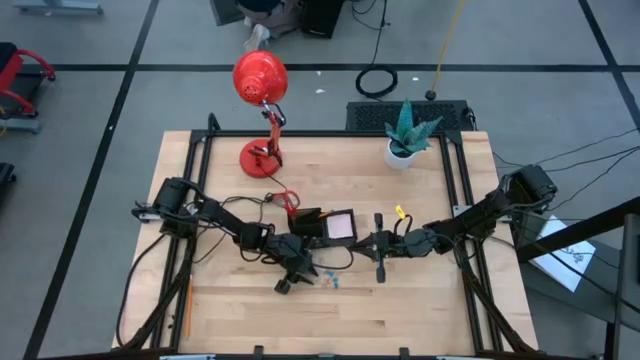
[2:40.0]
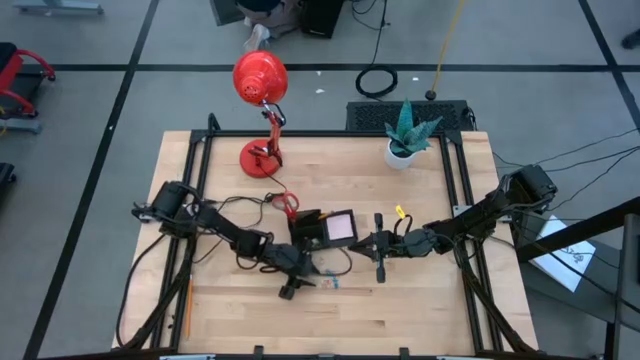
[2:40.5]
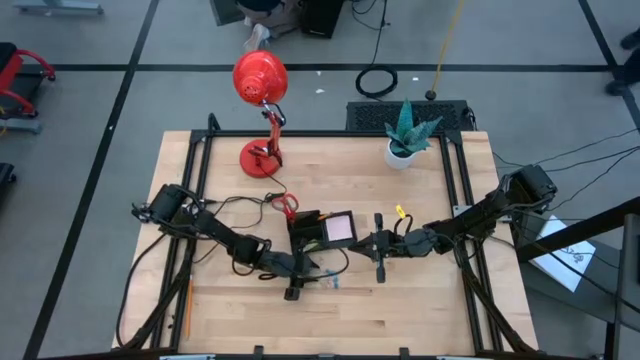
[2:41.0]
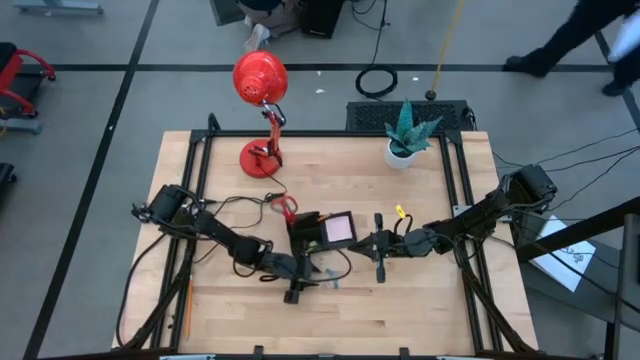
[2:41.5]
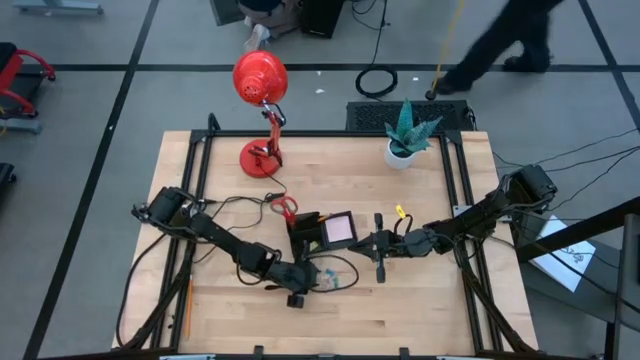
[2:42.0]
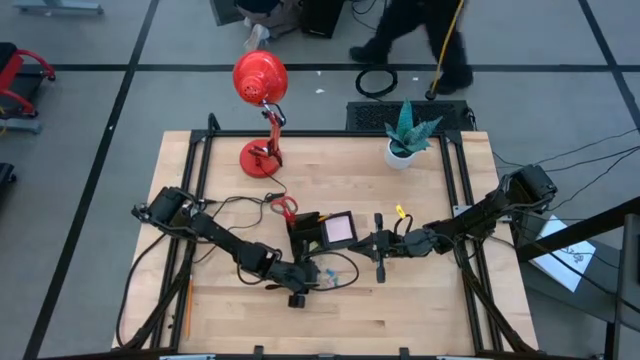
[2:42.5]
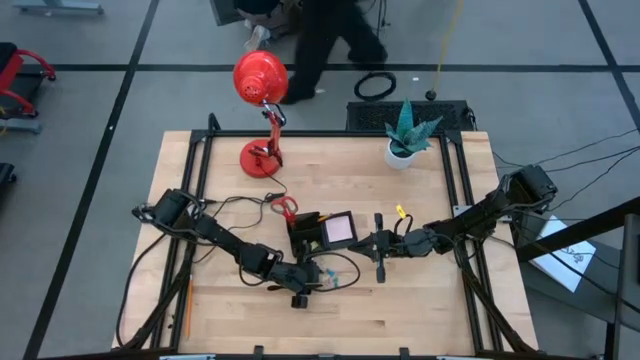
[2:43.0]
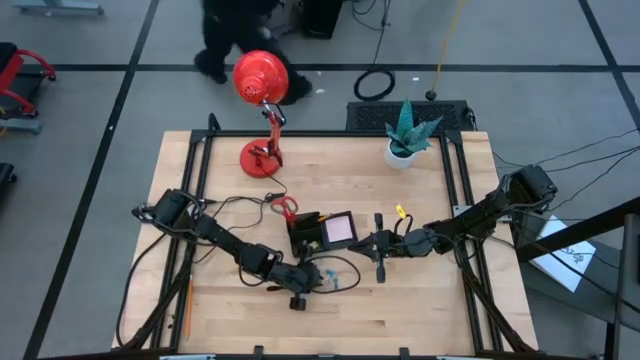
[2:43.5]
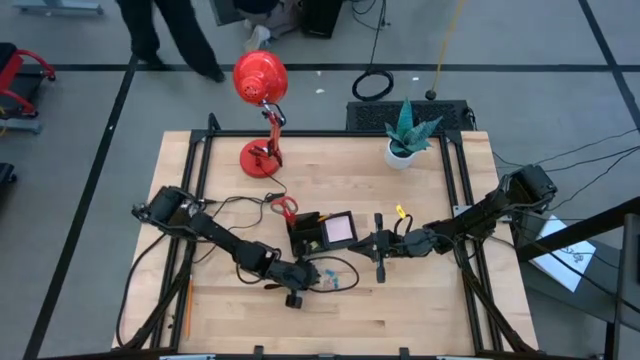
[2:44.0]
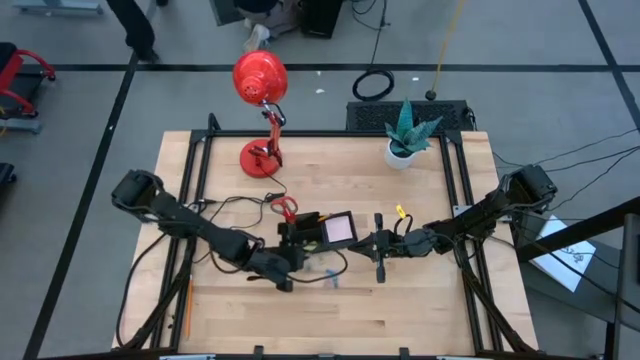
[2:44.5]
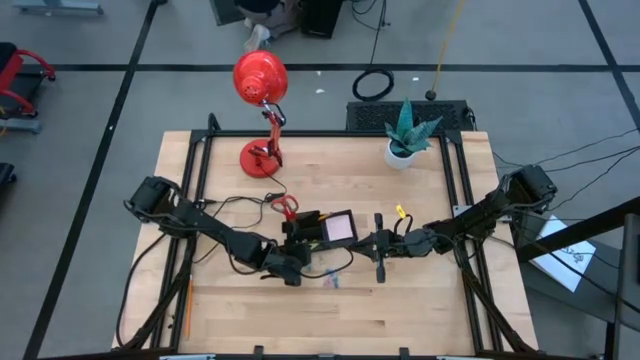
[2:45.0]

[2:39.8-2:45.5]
Task: Pick and place office supplies into organizer
Put the green binder clip into the black desk organizer

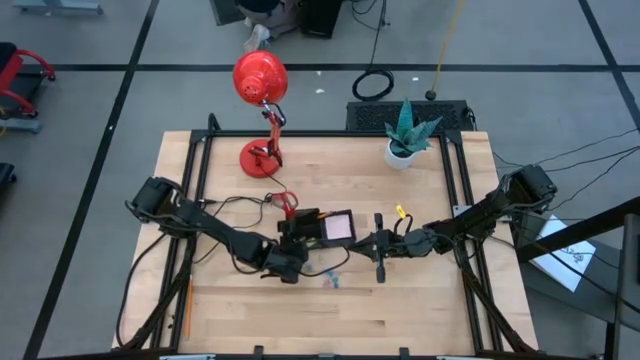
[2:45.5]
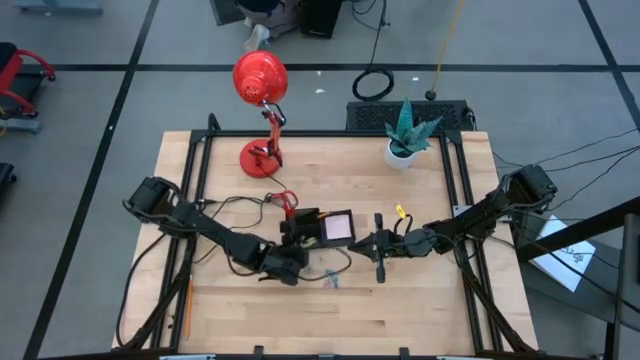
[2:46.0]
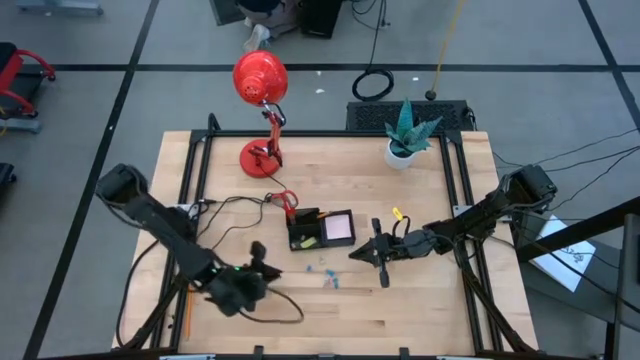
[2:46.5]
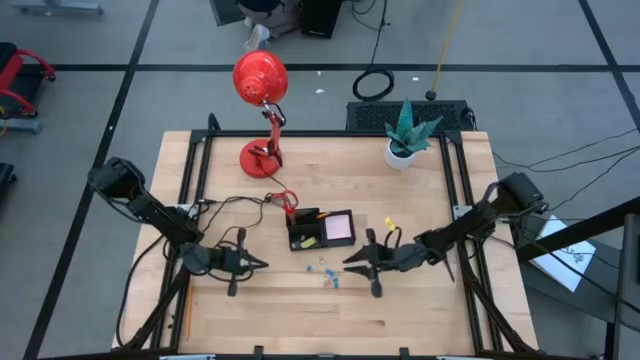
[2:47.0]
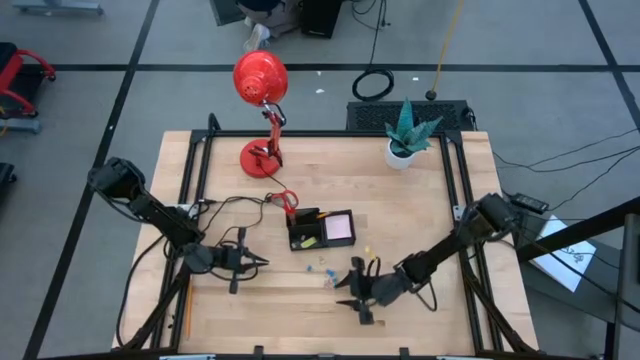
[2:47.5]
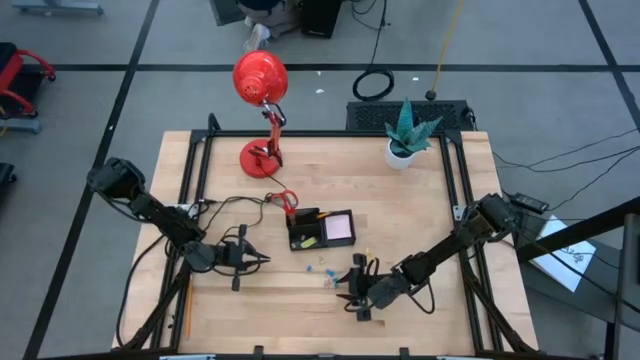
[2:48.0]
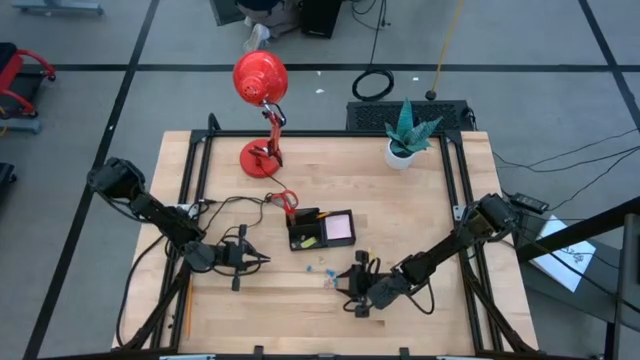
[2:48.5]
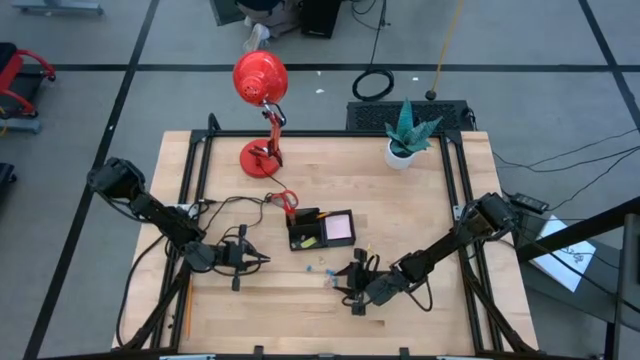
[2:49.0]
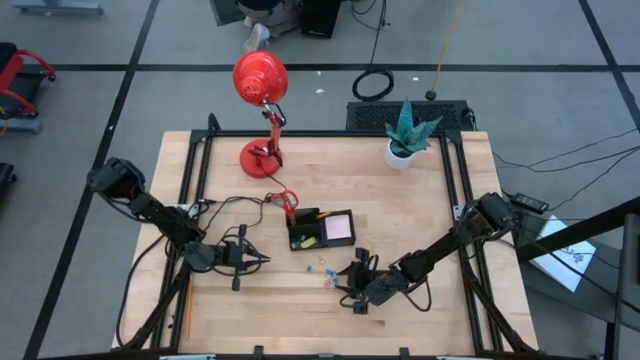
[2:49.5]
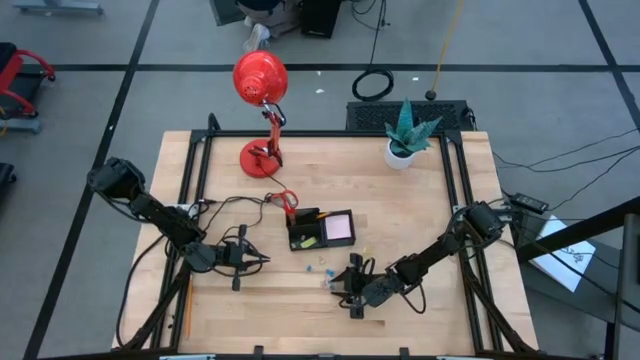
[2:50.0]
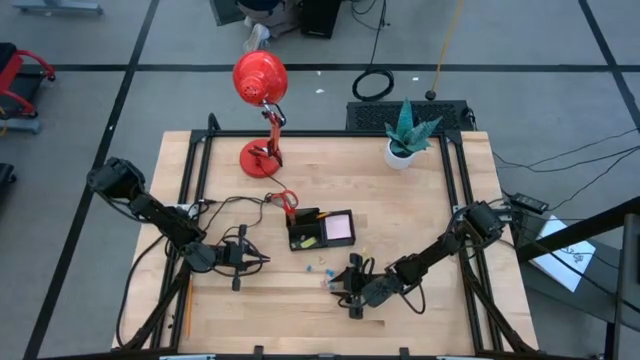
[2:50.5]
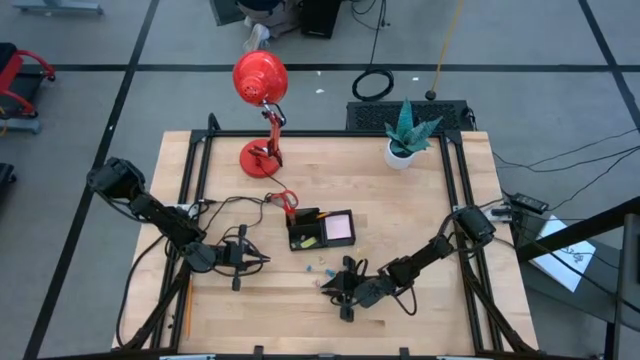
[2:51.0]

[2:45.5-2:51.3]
Put the blue binder clip into the black desk organizer

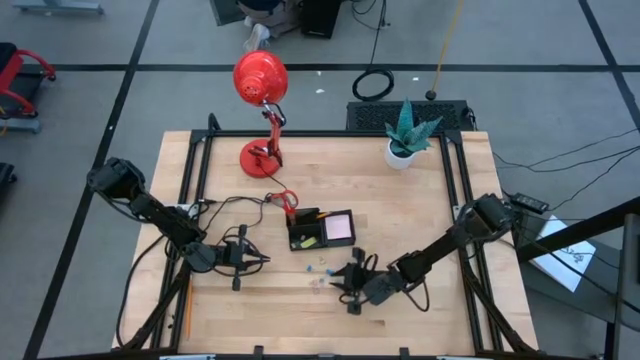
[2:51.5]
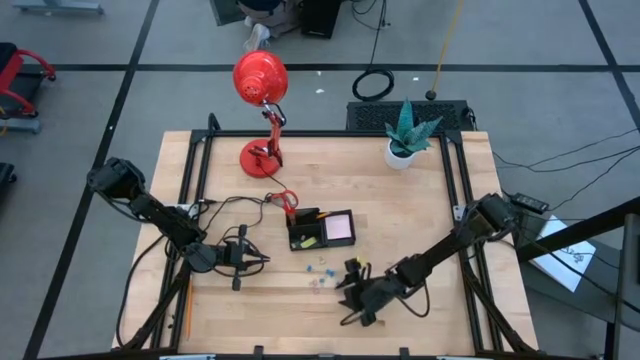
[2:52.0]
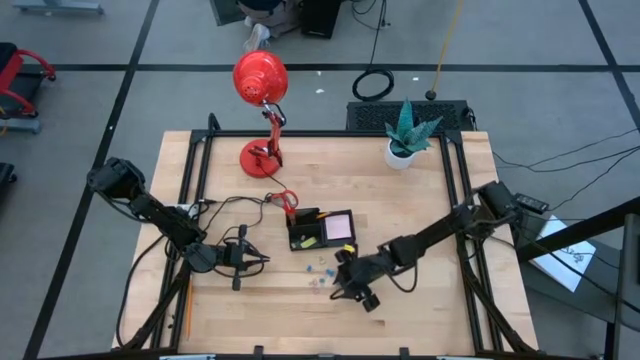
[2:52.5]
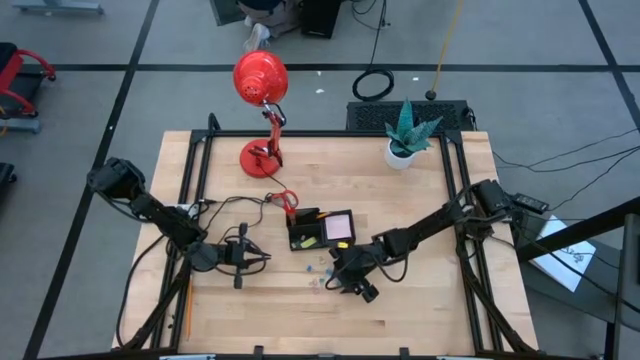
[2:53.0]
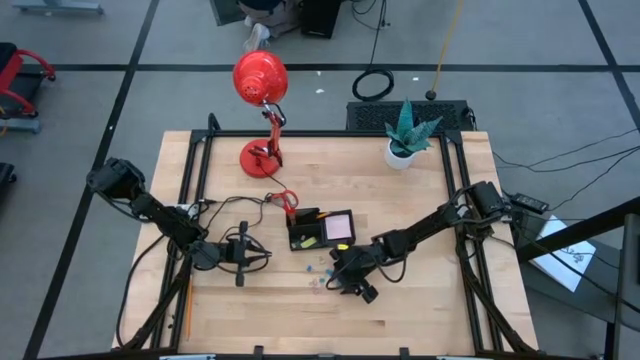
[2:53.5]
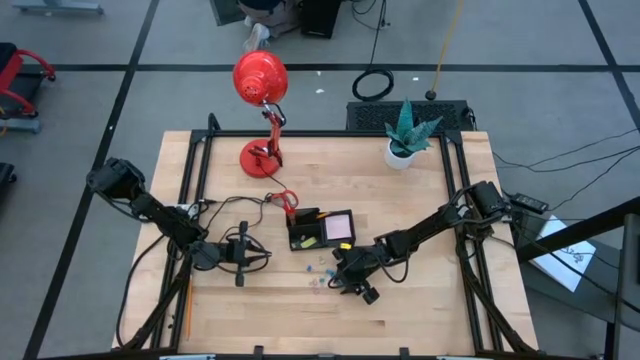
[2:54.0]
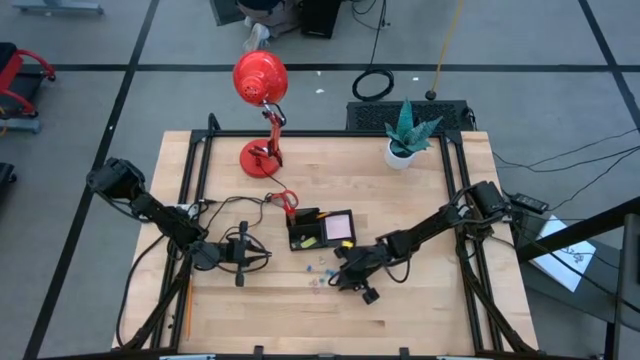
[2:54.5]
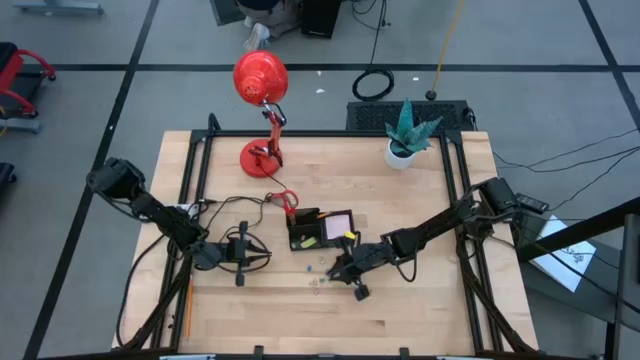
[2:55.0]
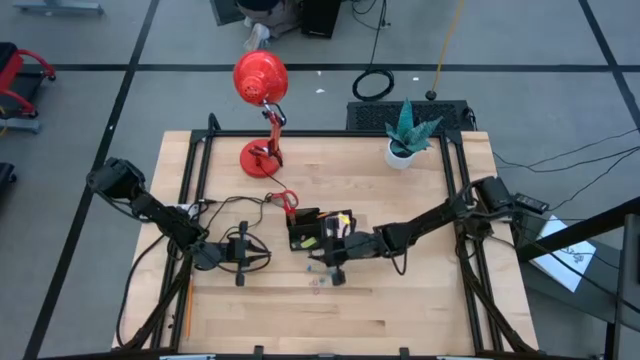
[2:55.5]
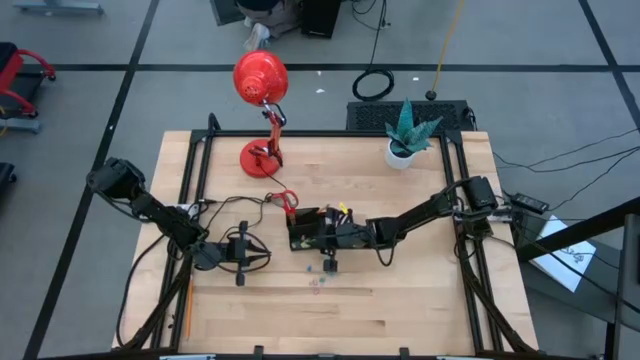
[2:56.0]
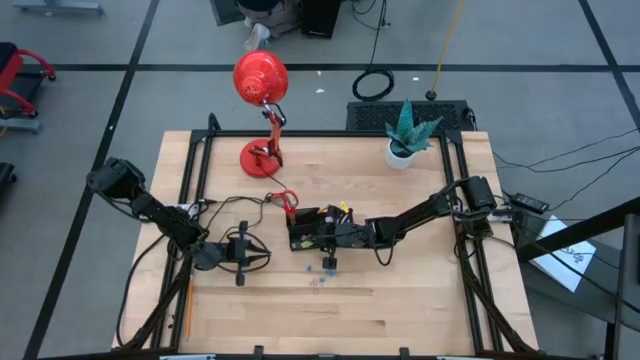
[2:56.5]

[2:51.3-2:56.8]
Put the blue binder clip into the black desk organizer

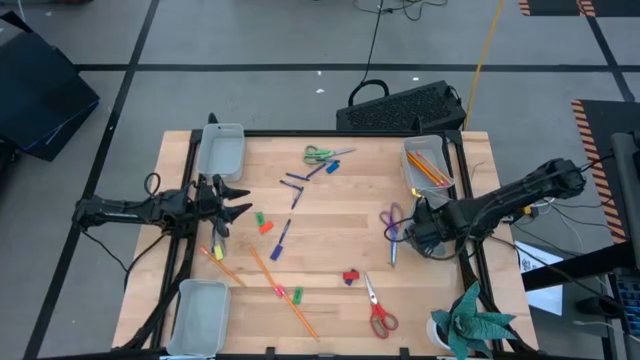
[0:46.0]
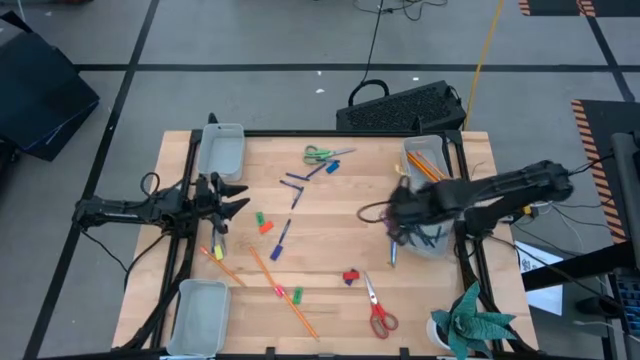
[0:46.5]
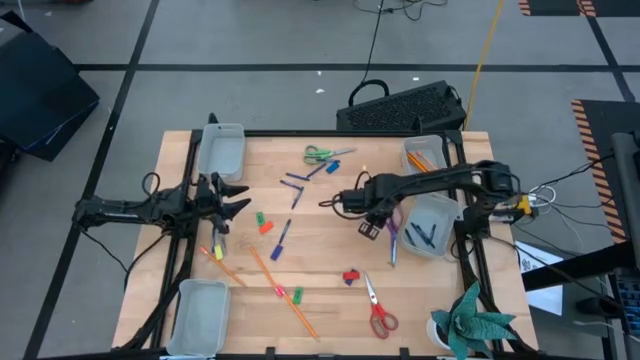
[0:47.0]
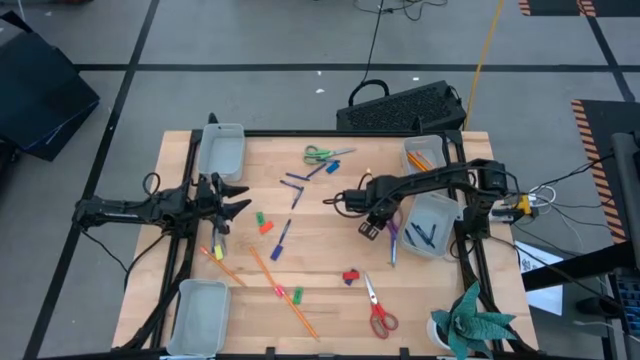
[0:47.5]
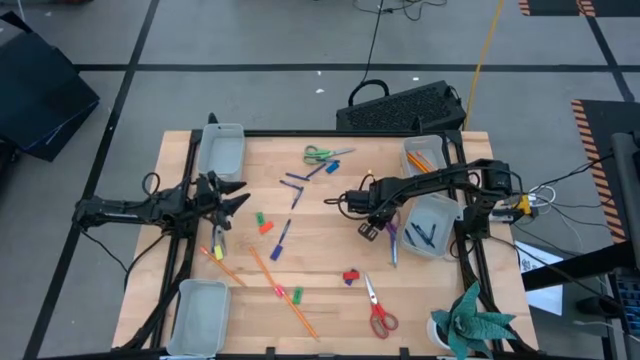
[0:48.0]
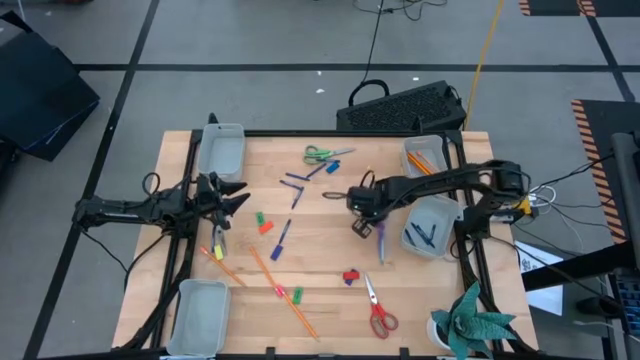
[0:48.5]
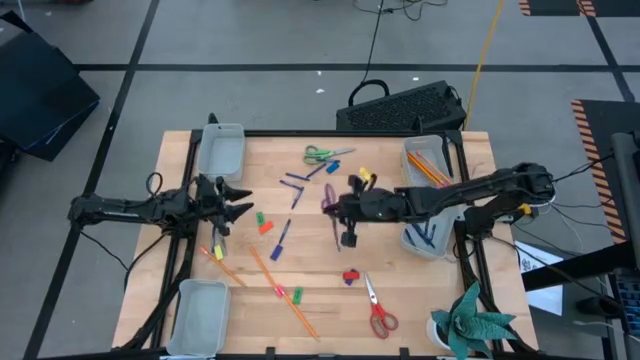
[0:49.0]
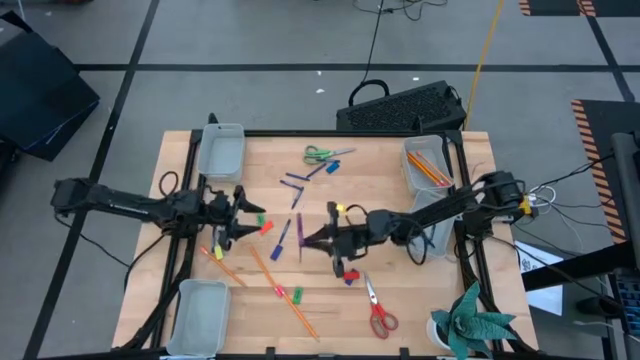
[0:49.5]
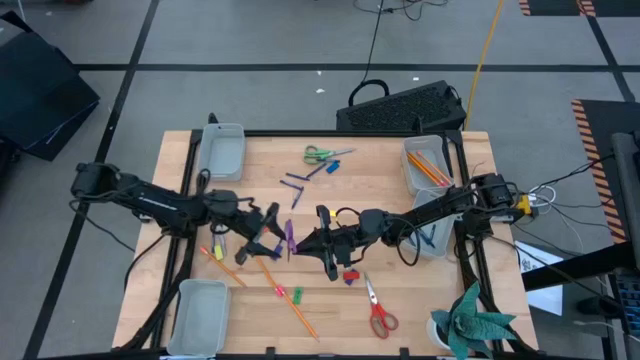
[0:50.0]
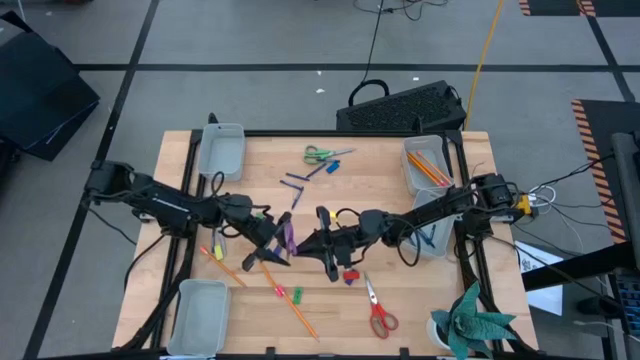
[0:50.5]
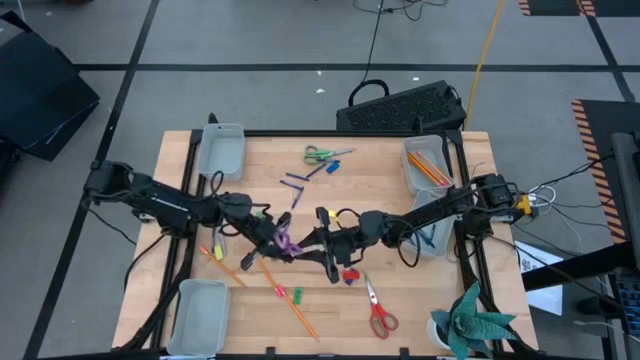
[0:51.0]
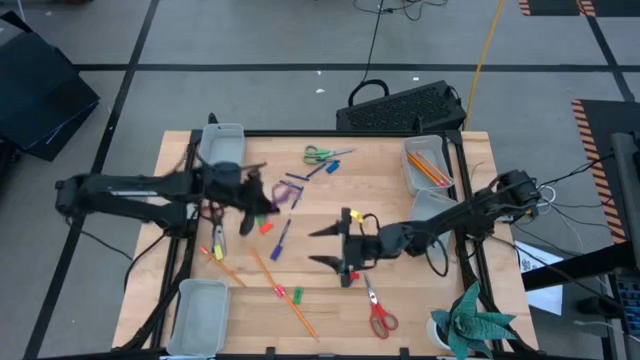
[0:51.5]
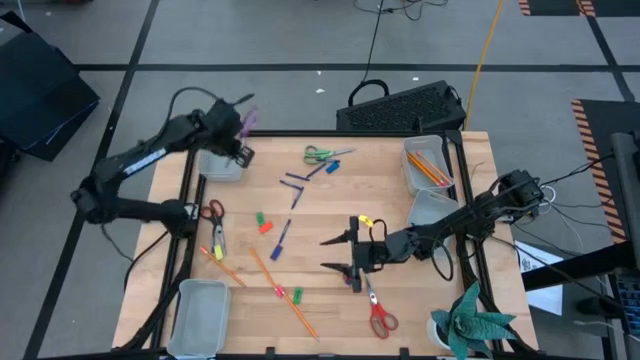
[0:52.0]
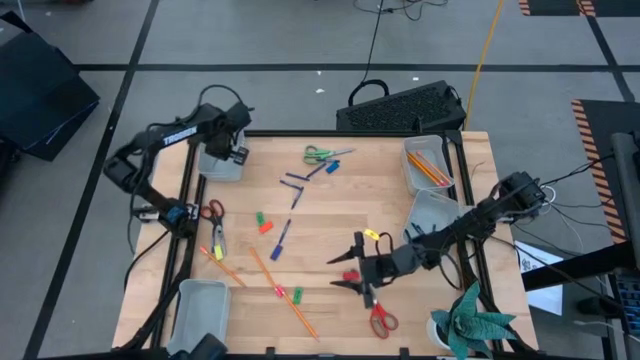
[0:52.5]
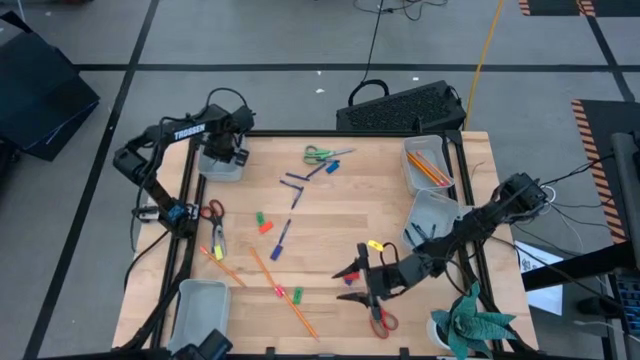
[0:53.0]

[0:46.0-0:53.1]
Task: Sort crayons/erasers/pens/pencils in bins
Put the violet scissor into the top left gray bin
